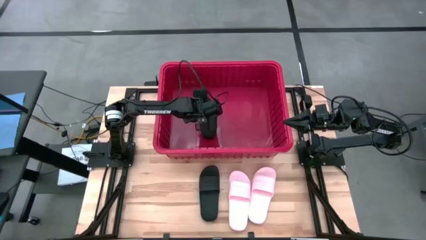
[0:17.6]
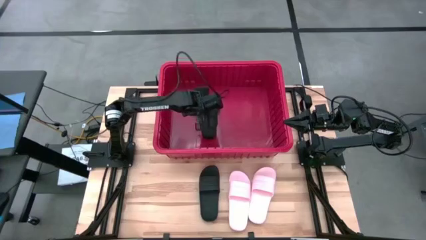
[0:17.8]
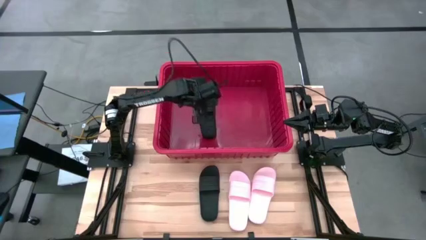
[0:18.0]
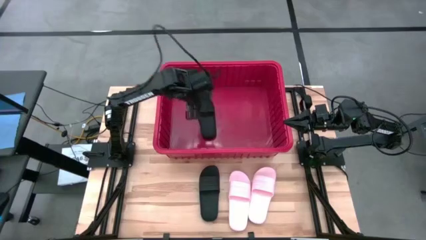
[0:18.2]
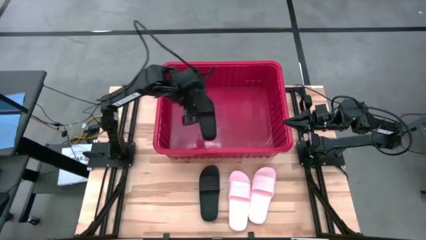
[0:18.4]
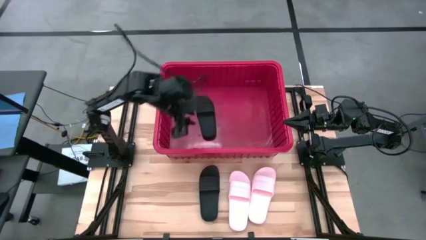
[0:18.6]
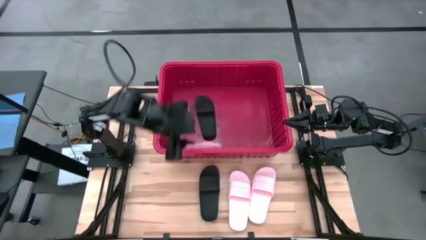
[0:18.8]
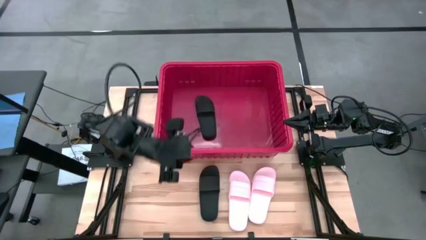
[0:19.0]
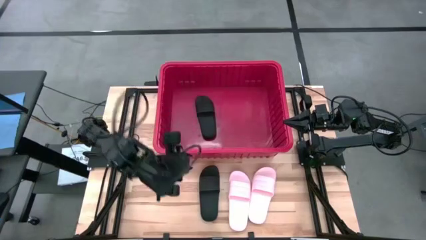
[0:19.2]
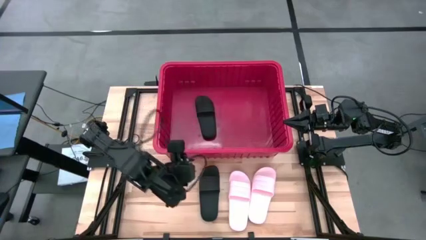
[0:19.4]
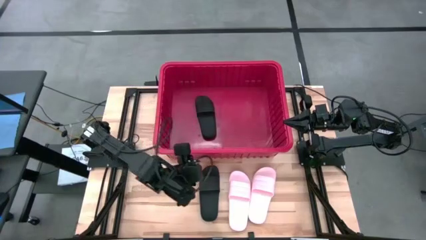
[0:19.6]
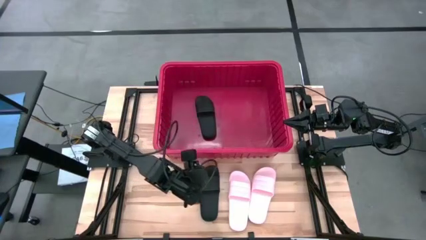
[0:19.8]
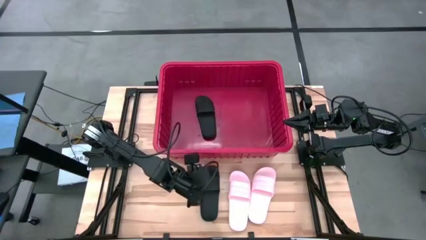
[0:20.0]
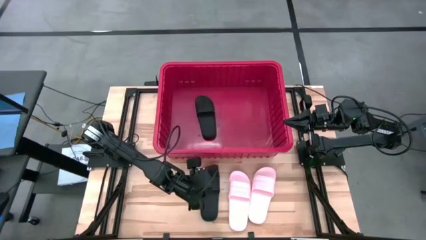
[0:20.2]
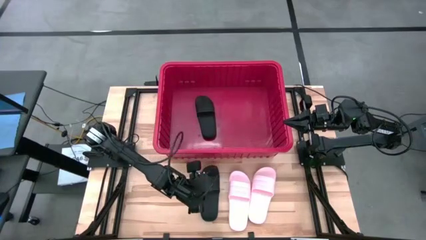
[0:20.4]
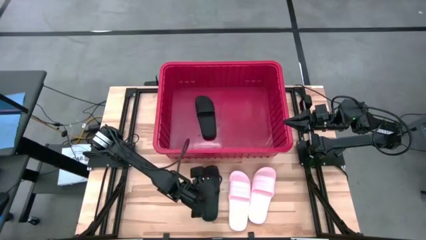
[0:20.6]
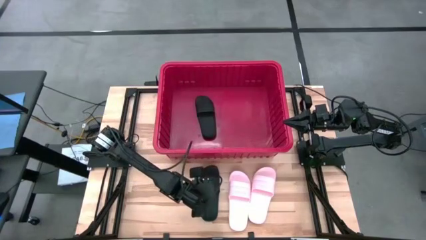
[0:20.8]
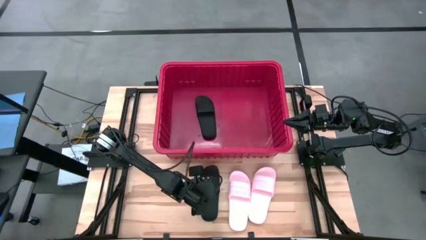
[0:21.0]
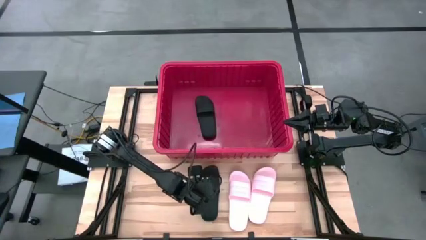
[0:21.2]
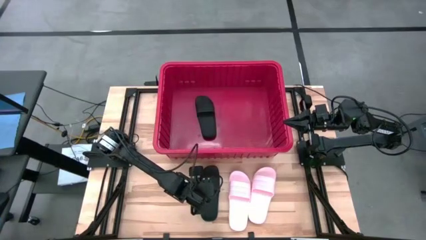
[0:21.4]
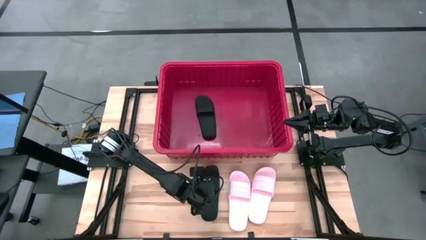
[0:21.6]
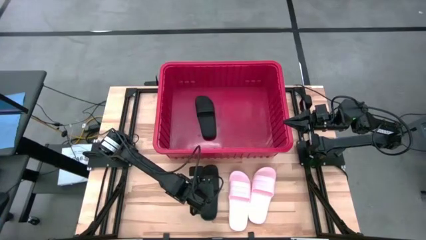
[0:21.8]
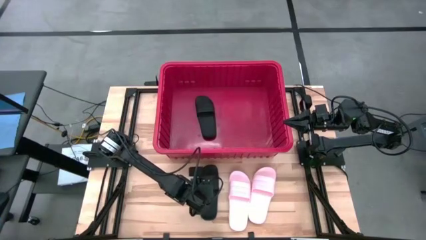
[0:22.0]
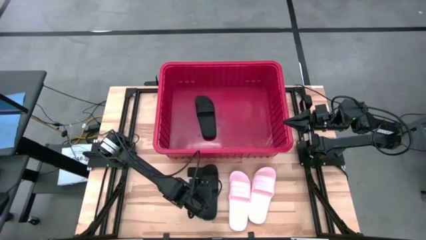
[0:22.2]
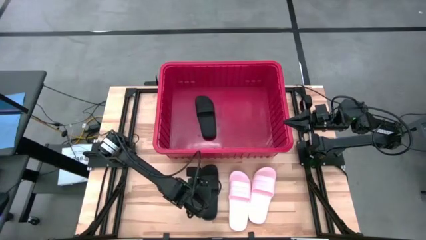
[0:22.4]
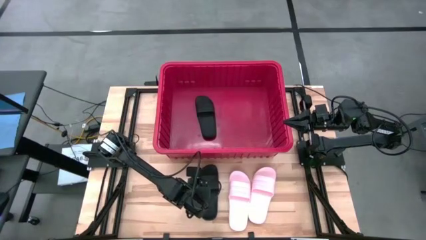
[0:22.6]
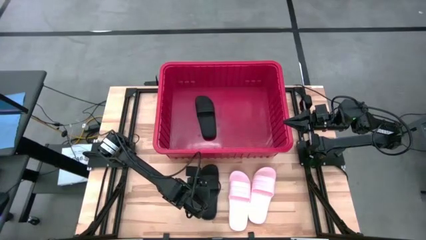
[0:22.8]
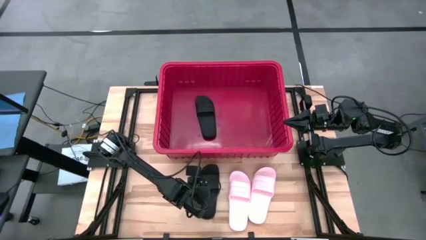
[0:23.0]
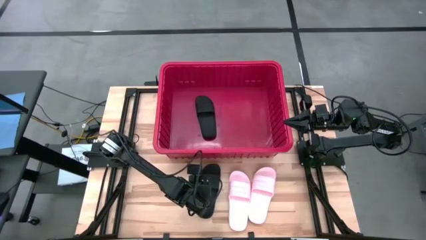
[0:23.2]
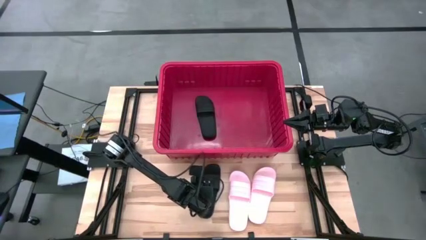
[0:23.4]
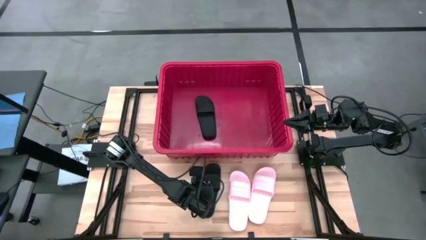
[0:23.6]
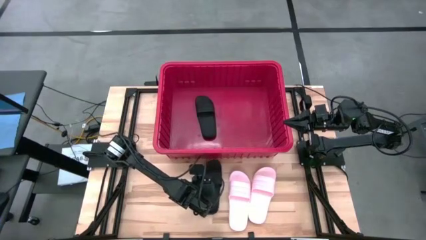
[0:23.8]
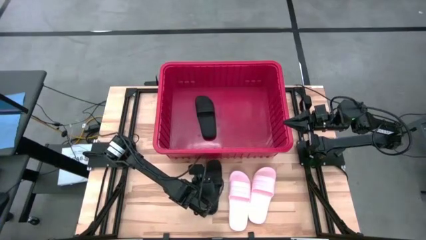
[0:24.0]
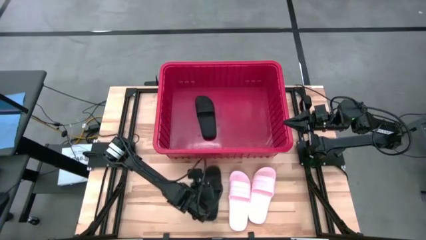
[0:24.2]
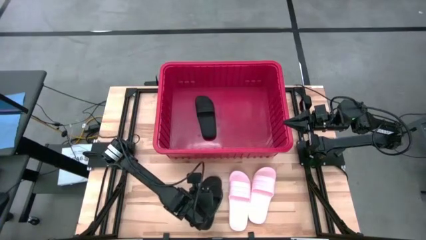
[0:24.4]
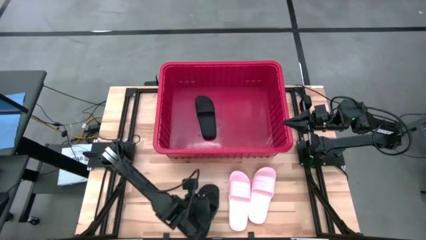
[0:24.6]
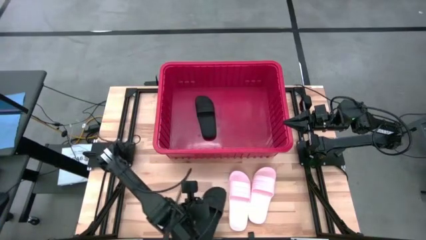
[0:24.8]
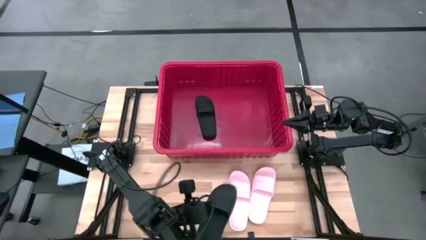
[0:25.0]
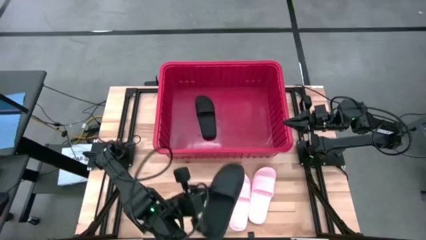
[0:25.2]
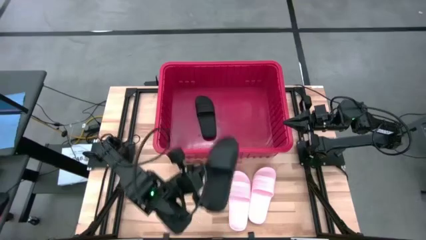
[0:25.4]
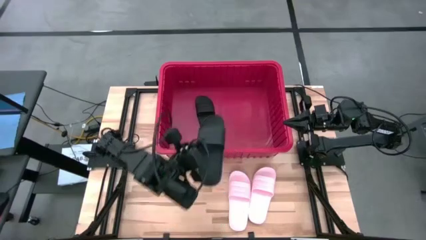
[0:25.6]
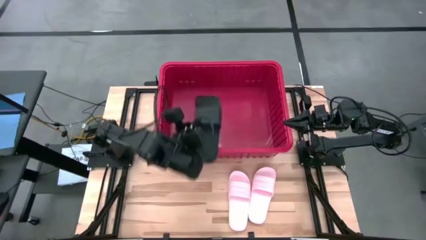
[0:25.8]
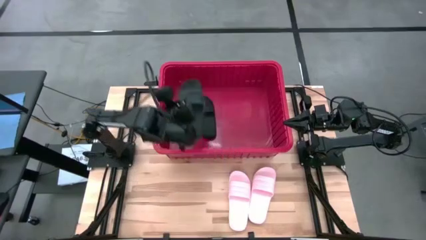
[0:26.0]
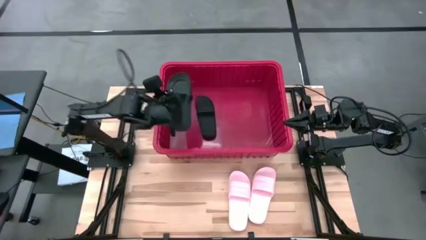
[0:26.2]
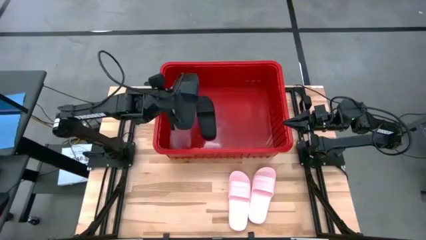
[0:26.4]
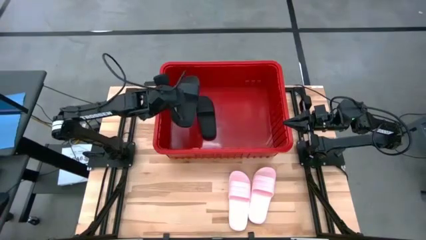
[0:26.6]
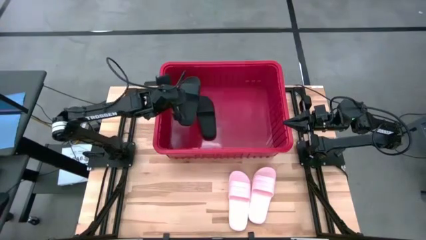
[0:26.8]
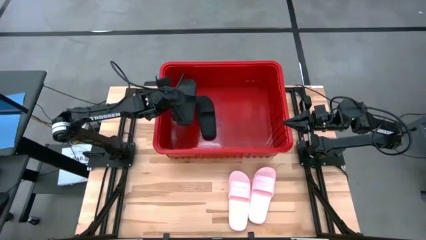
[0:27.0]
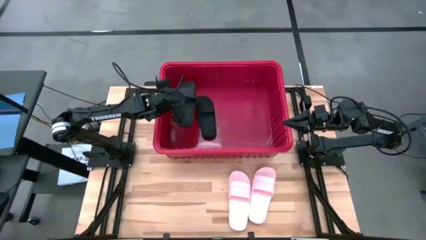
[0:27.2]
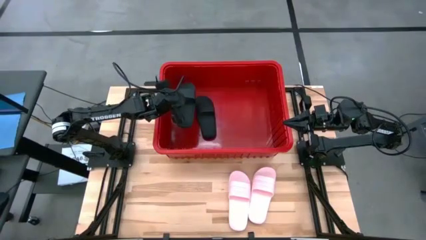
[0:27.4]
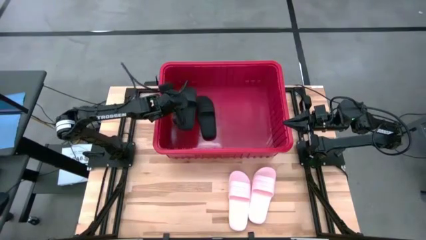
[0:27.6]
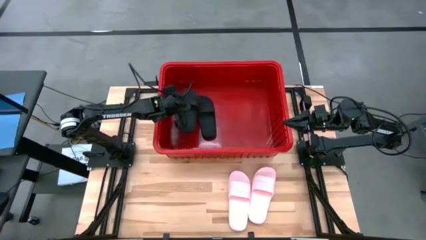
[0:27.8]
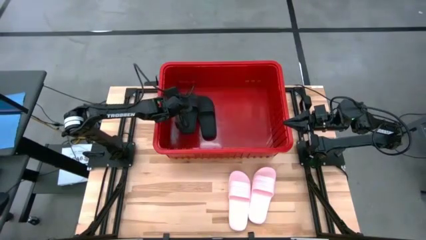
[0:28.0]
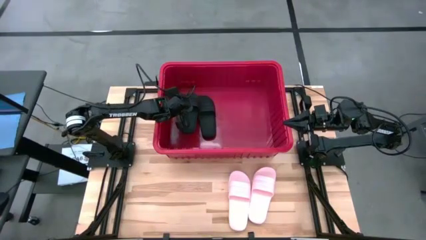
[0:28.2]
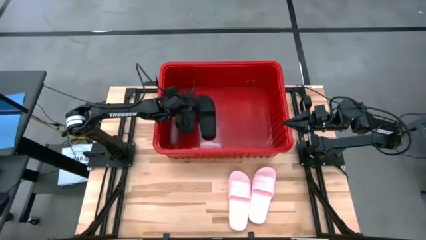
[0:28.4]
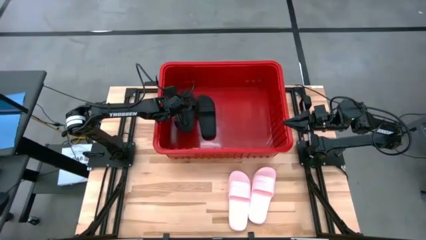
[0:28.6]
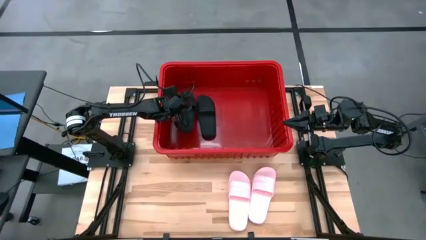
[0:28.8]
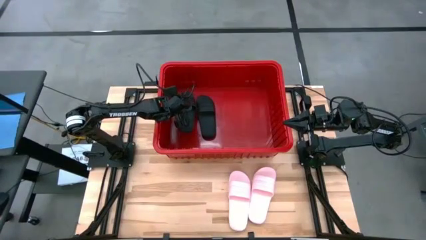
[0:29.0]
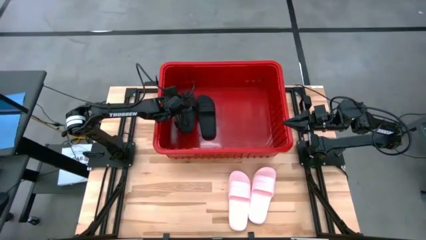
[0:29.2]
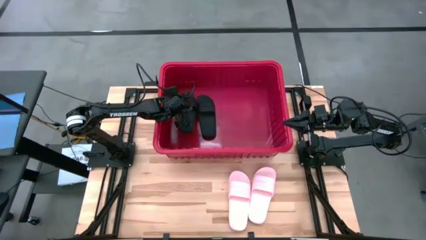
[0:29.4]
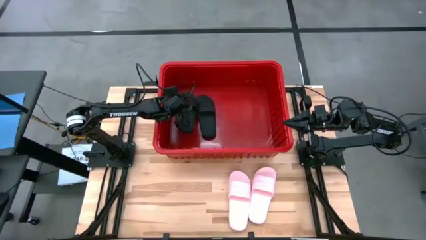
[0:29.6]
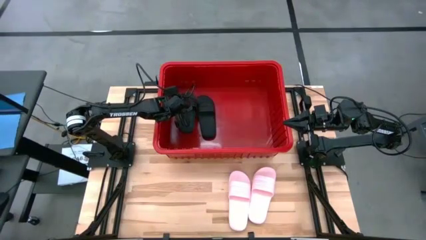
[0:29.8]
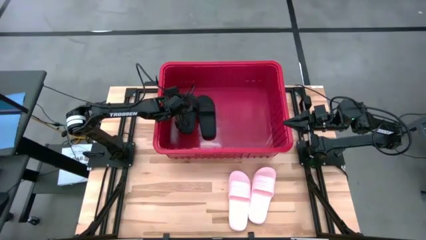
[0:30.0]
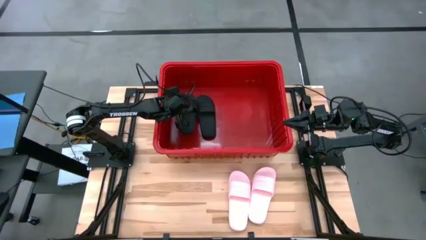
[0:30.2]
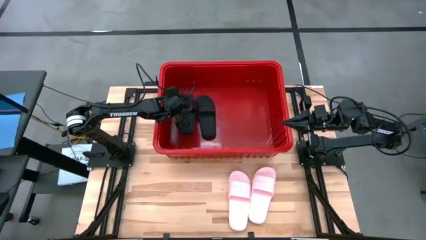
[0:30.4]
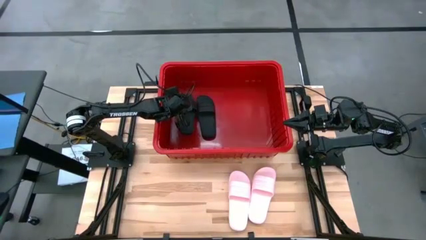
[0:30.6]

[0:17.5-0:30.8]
Task: Pick and place slides into bin
Put the black slipper into the red bin
